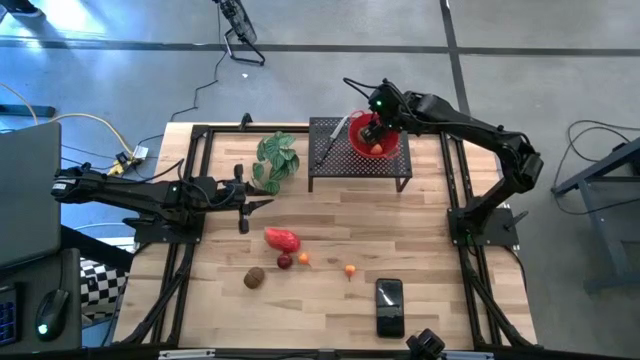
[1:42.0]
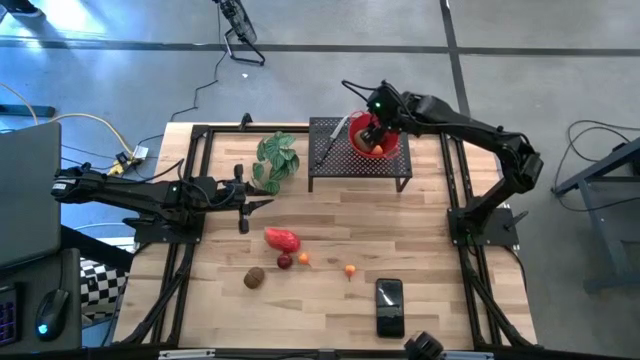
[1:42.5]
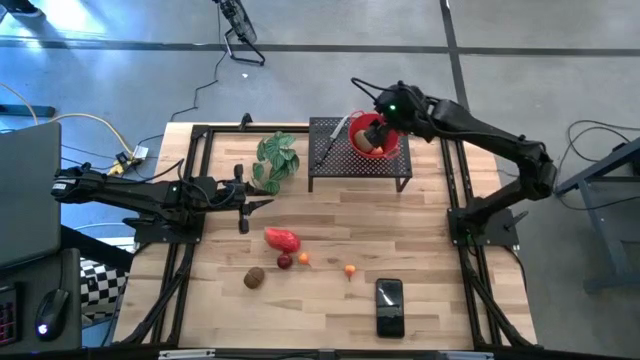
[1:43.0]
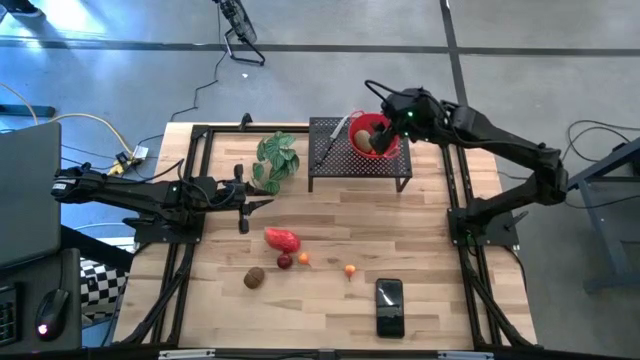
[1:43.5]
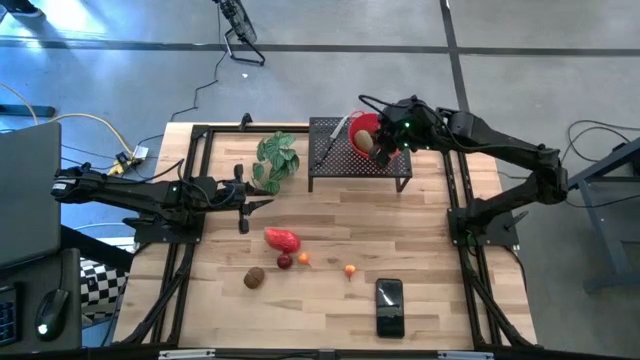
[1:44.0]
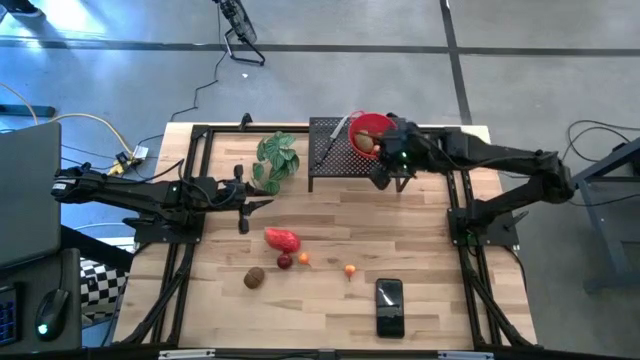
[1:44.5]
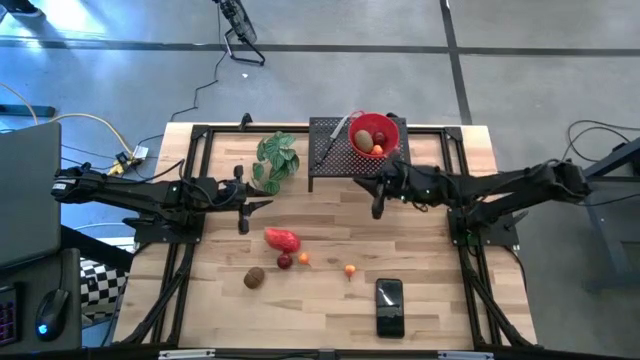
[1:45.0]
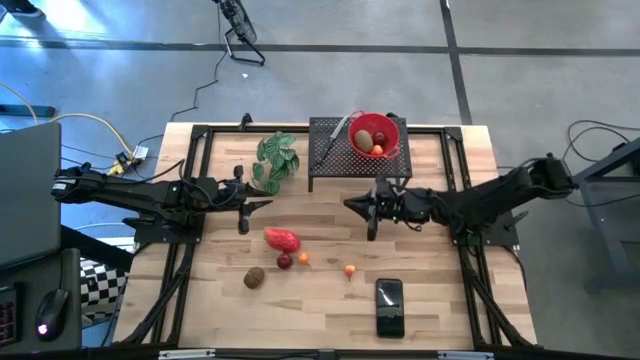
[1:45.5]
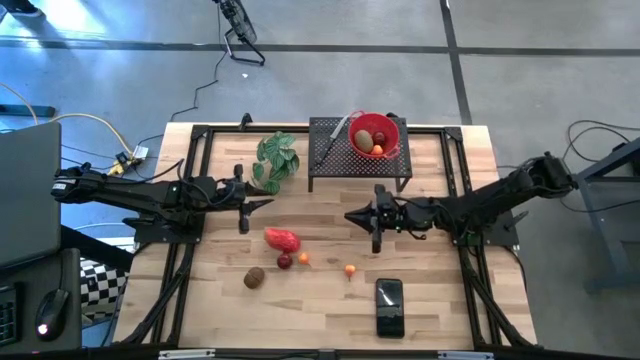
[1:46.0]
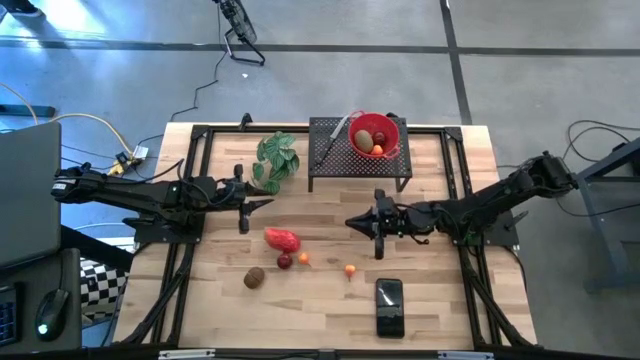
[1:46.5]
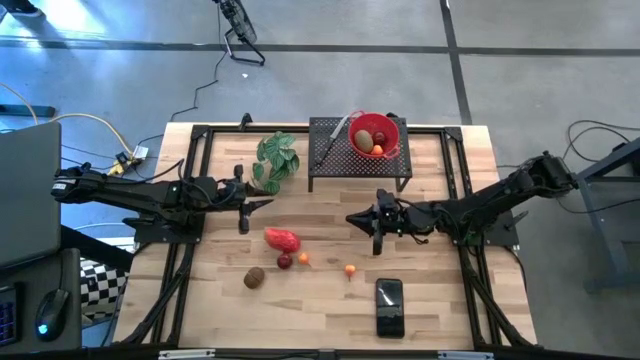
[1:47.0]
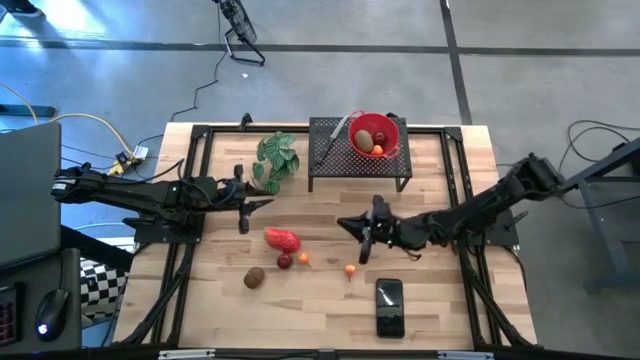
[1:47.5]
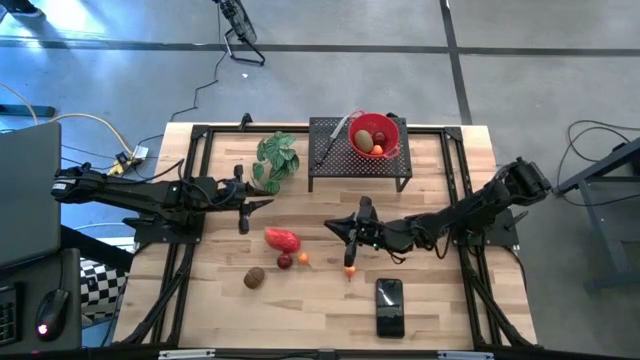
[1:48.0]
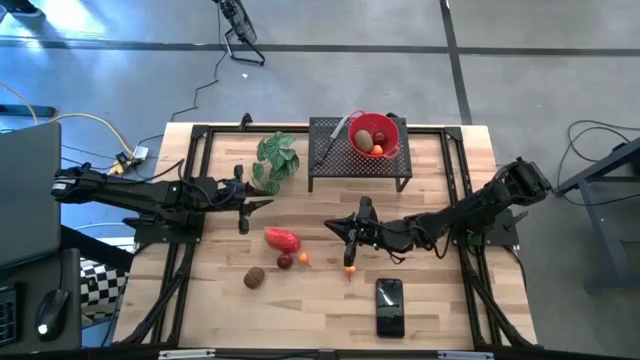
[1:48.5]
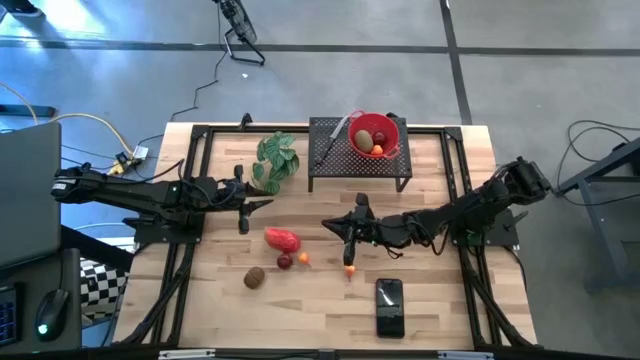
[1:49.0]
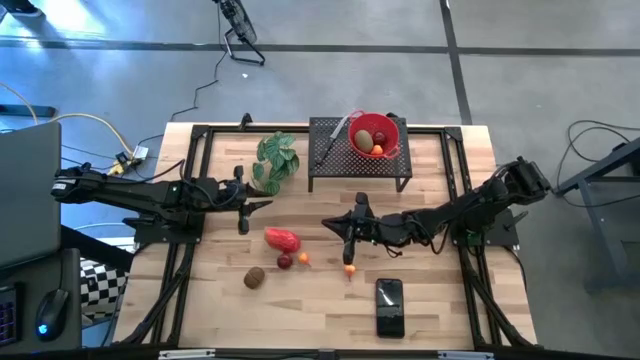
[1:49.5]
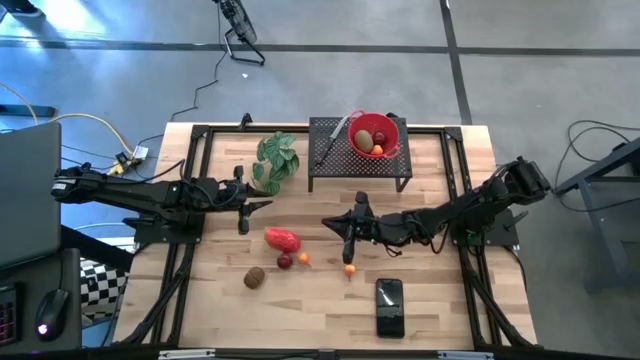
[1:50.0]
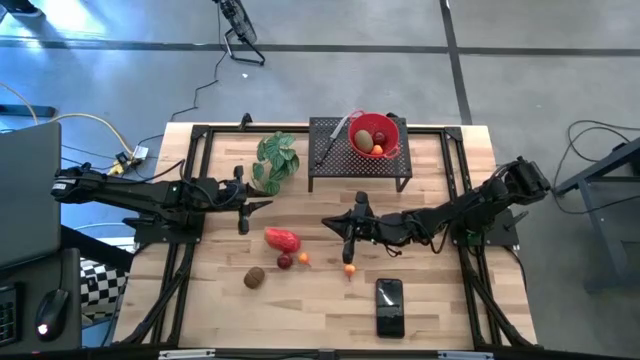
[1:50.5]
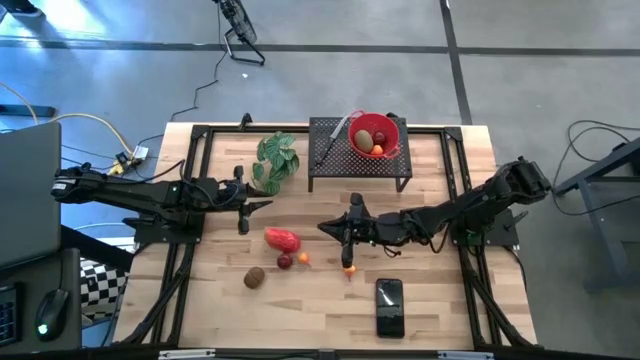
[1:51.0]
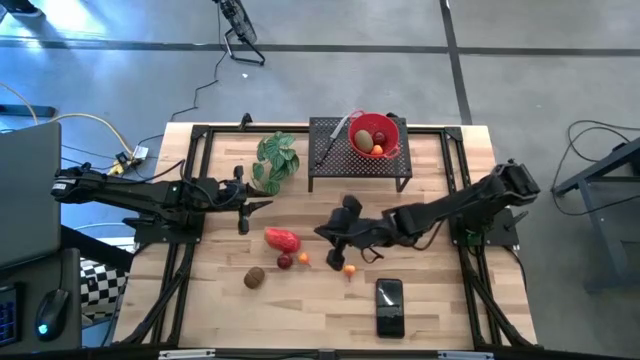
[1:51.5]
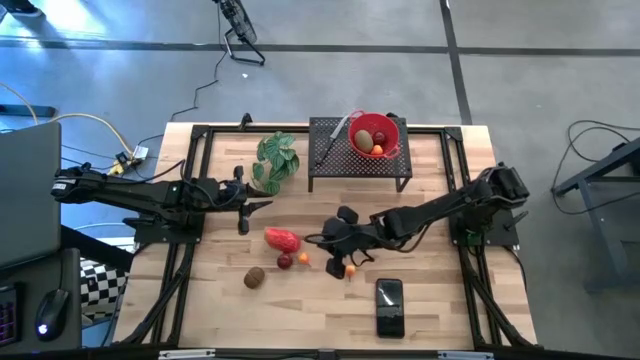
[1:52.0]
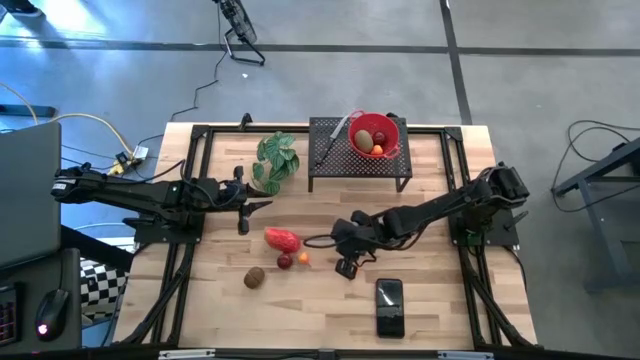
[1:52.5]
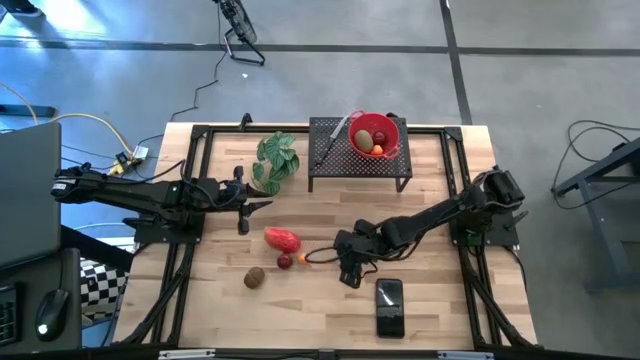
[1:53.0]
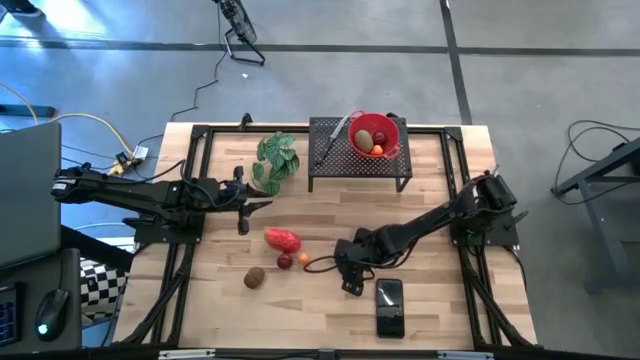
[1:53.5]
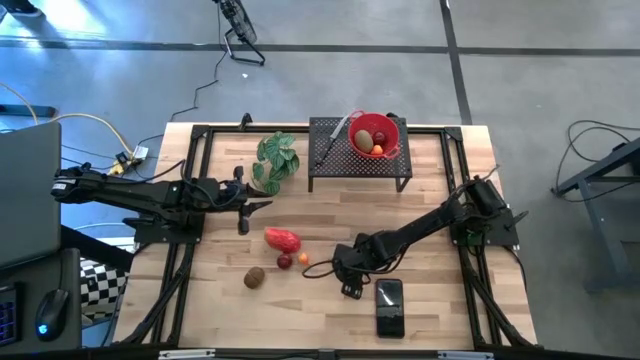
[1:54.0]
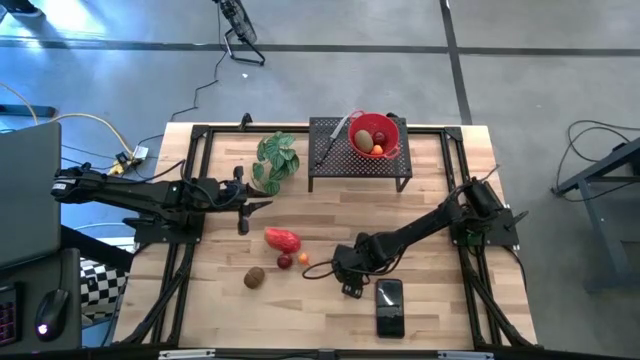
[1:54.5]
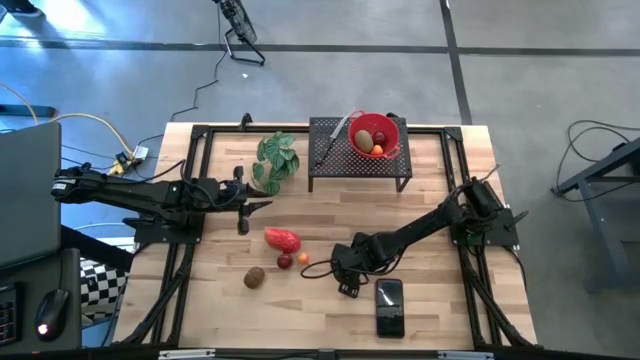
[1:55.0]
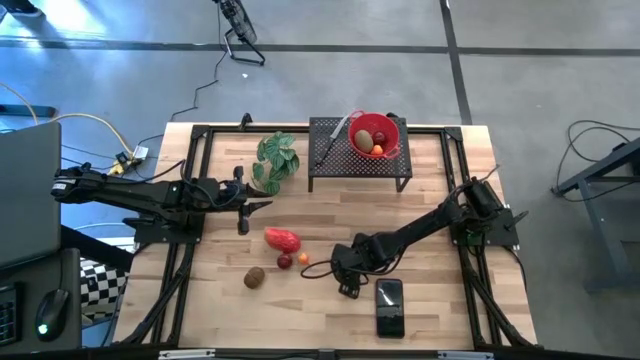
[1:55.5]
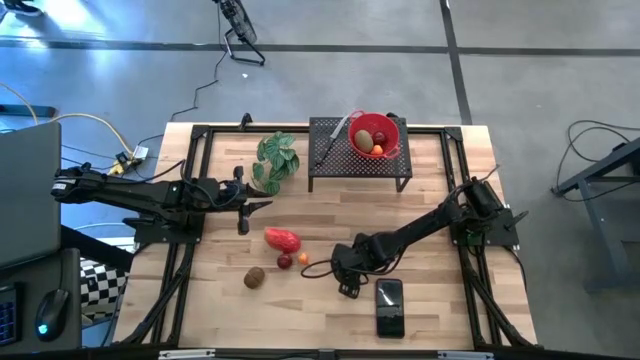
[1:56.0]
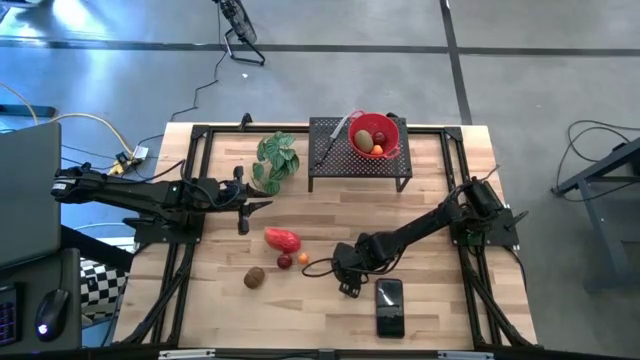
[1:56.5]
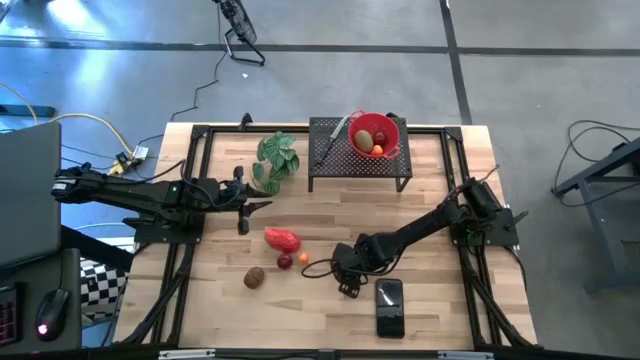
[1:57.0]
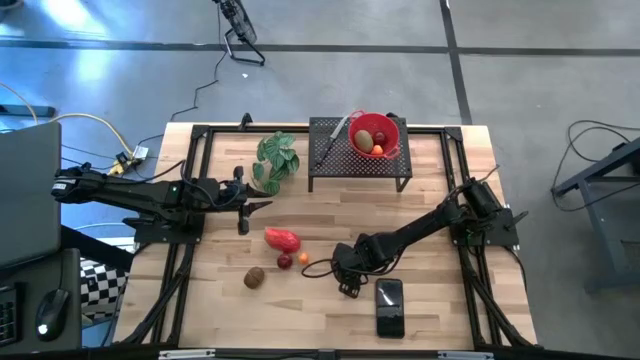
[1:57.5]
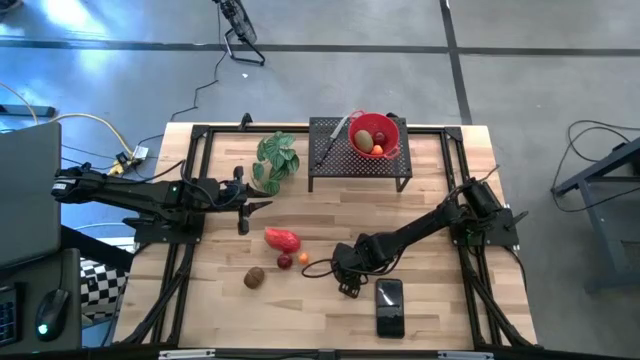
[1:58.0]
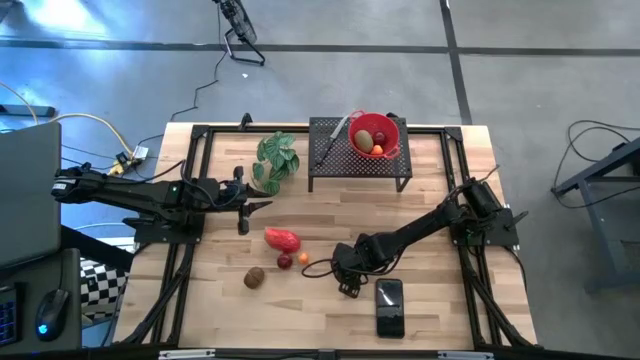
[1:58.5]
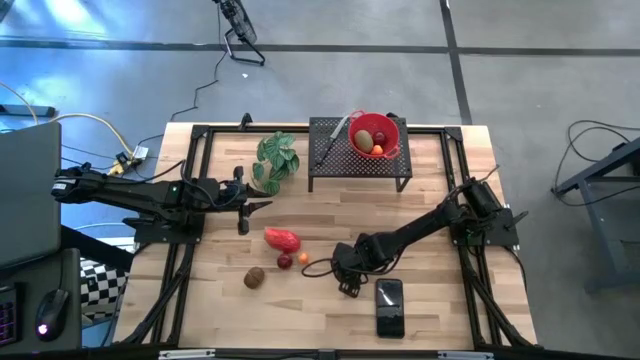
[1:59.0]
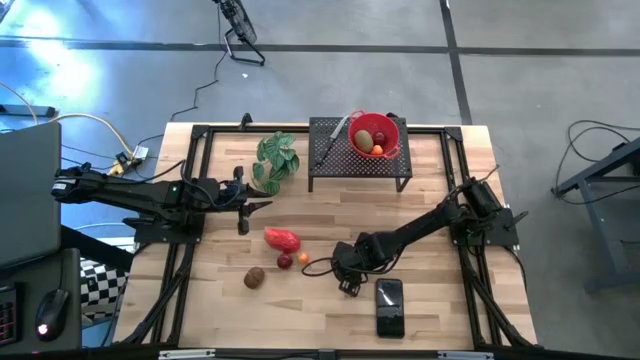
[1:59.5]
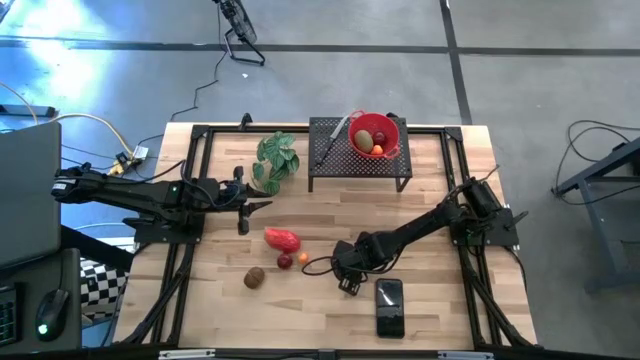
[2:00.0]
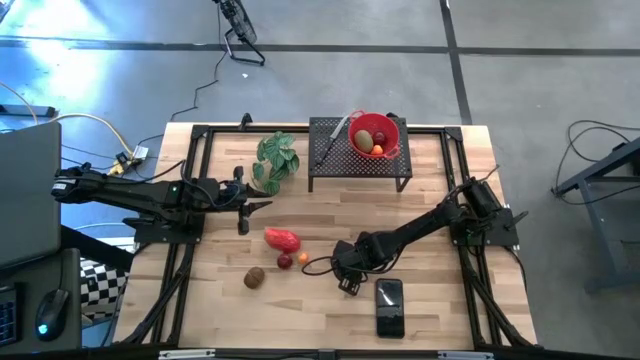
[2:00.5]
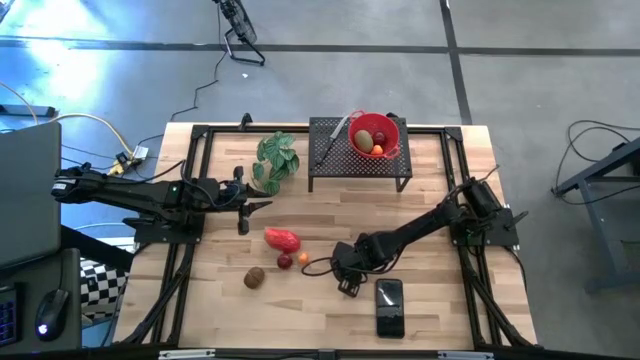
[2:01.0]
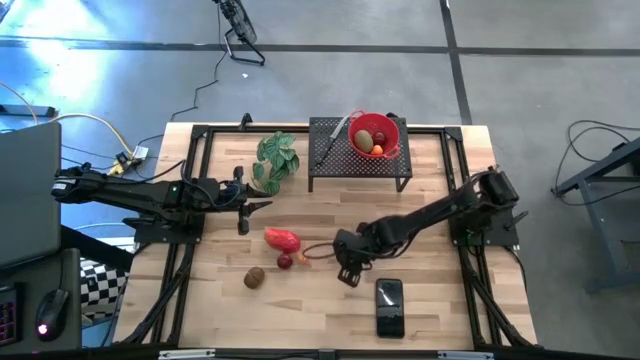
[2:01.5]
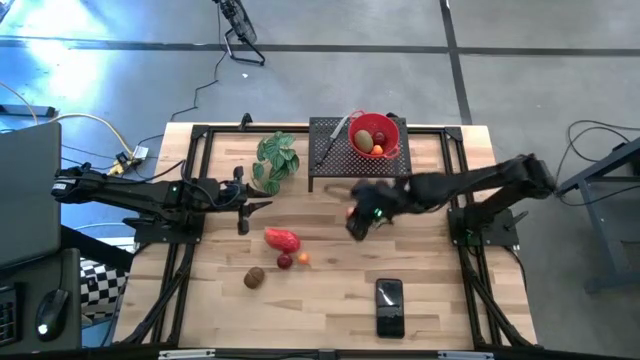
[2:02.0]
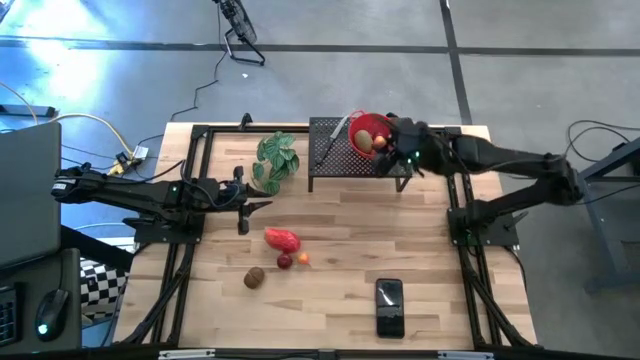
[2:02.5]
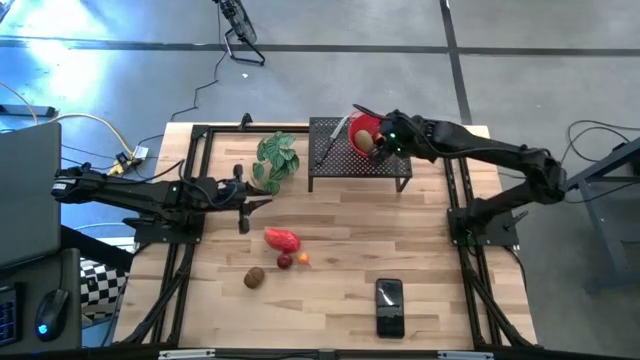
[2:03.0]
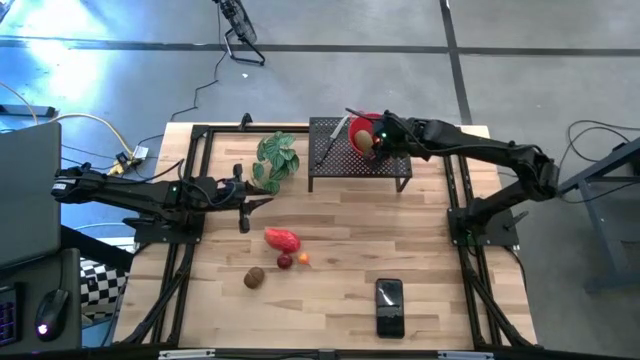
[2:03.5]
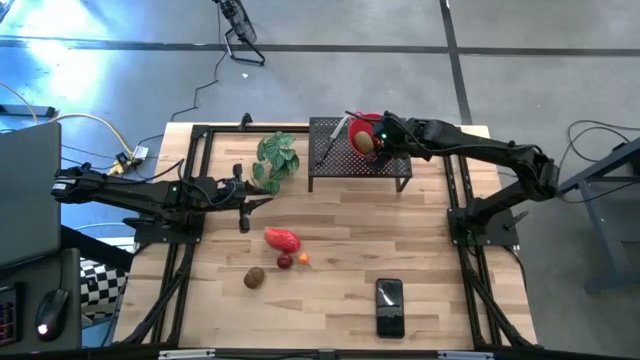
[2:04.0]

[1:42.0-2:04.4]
Task: Pick & Place Fruit
Put the right yellow pear into the red strainer bowl on the shelf
